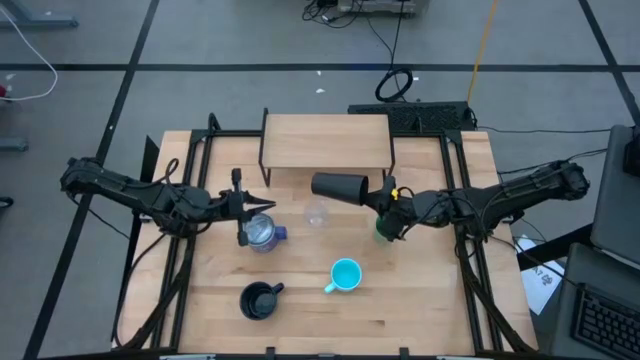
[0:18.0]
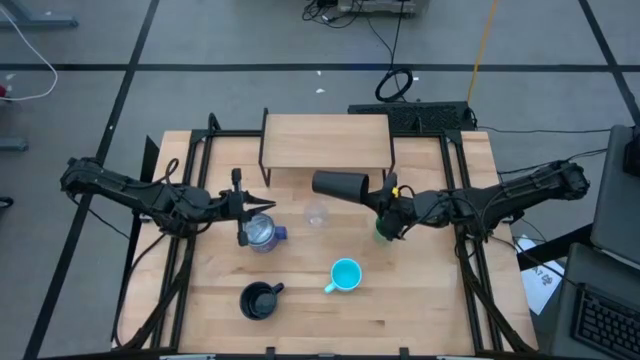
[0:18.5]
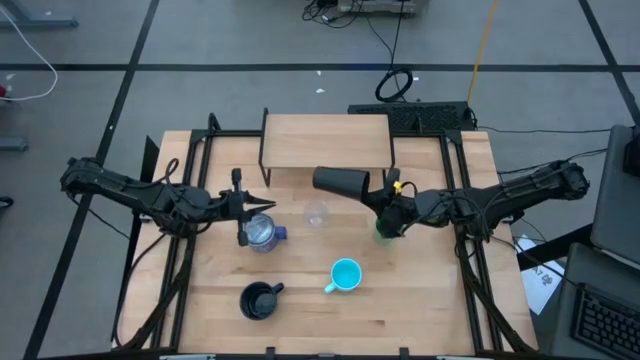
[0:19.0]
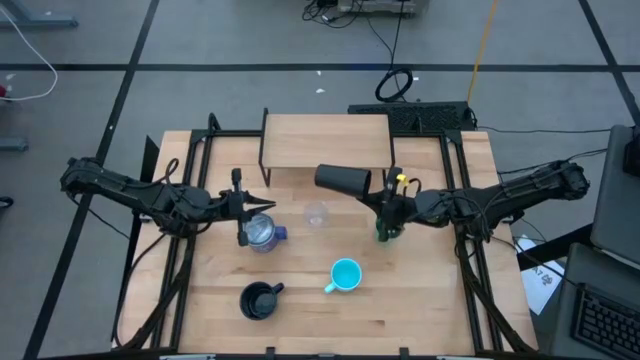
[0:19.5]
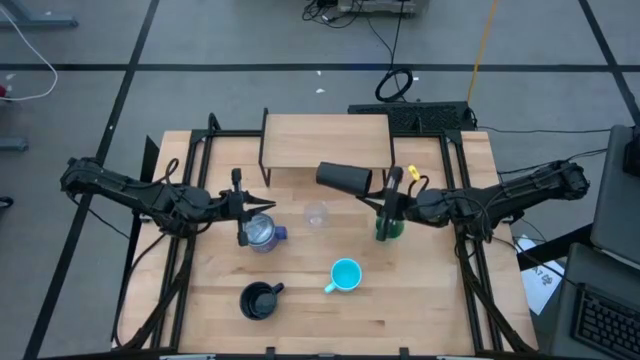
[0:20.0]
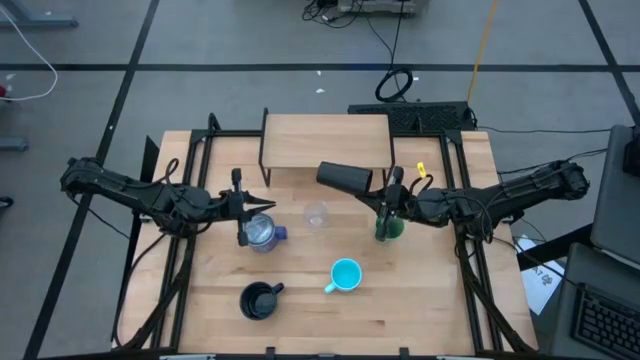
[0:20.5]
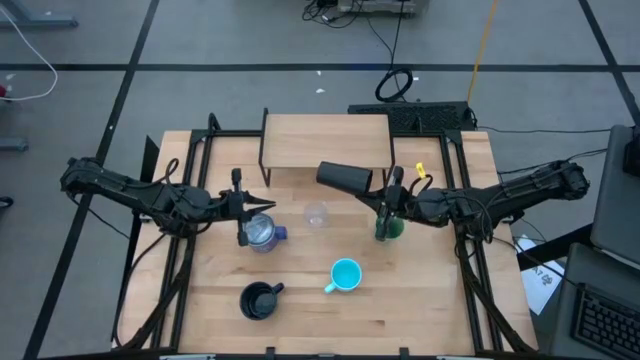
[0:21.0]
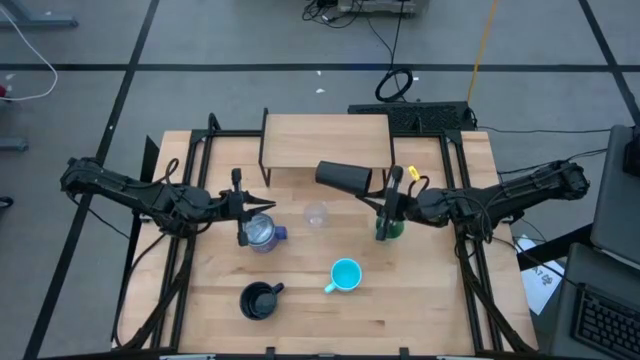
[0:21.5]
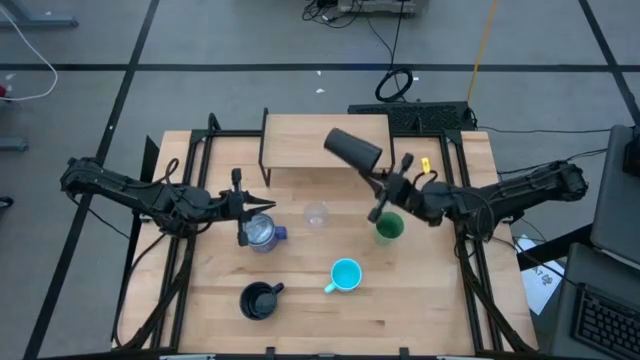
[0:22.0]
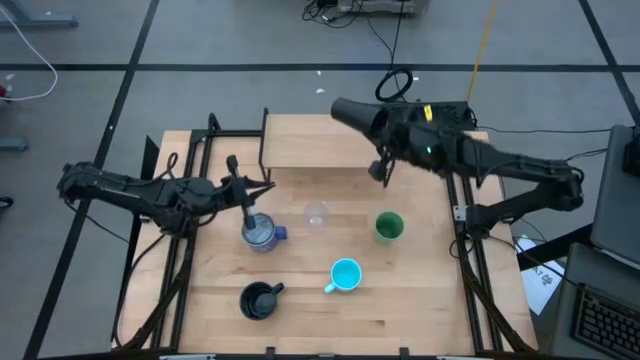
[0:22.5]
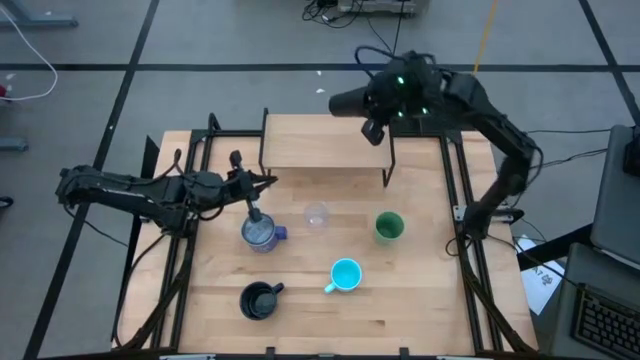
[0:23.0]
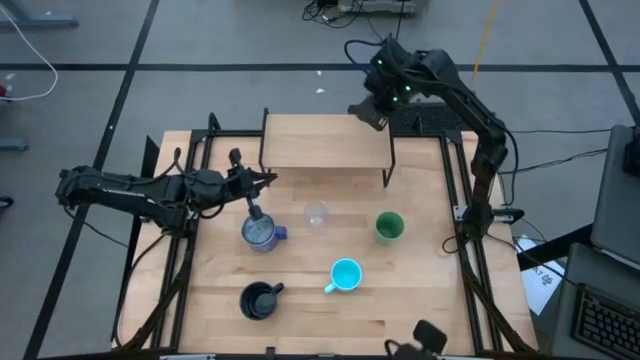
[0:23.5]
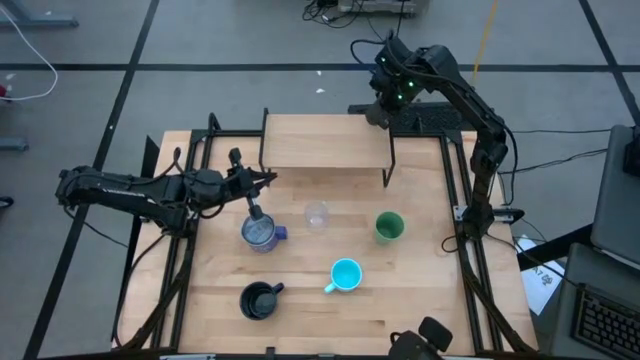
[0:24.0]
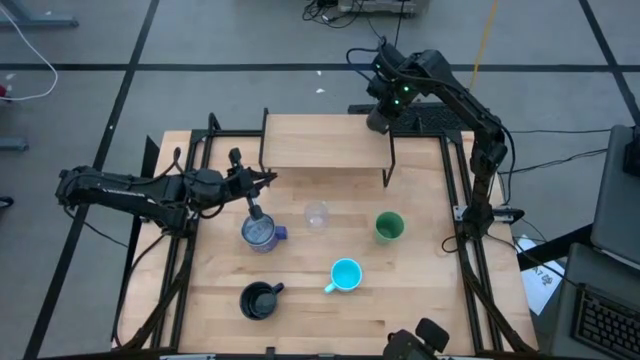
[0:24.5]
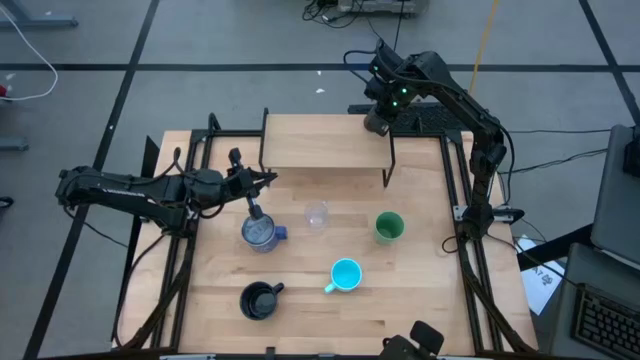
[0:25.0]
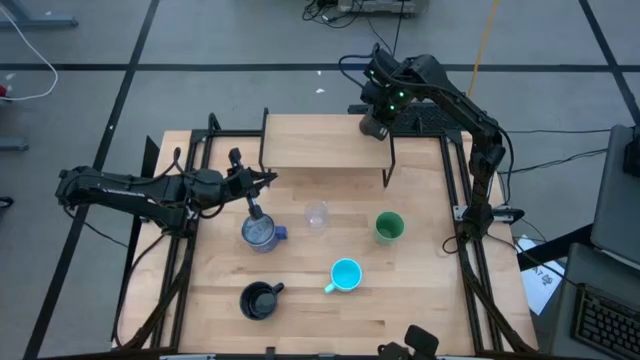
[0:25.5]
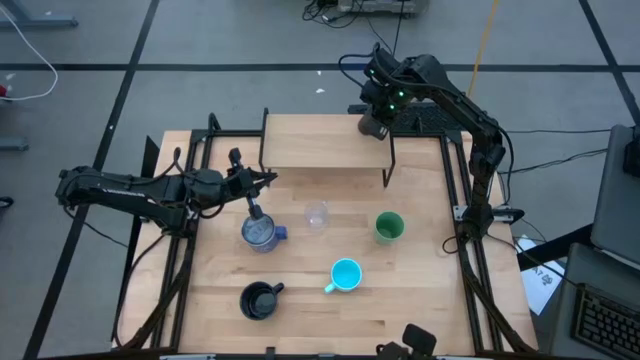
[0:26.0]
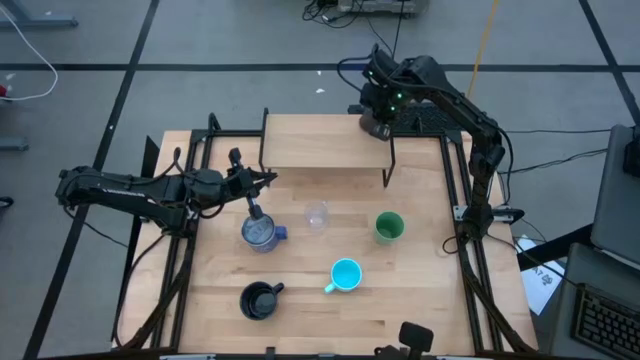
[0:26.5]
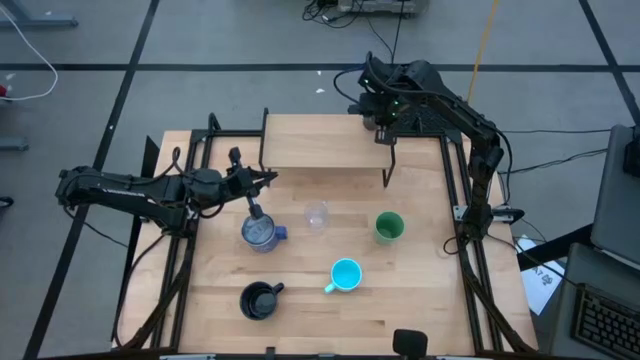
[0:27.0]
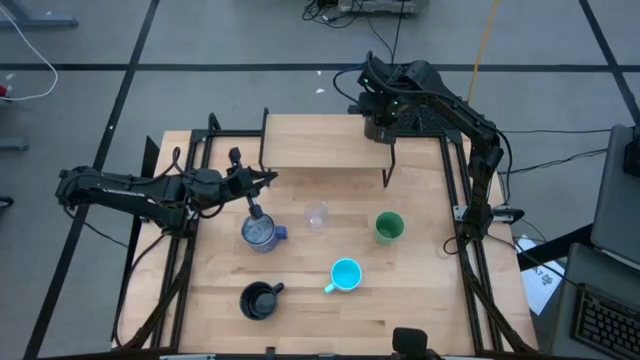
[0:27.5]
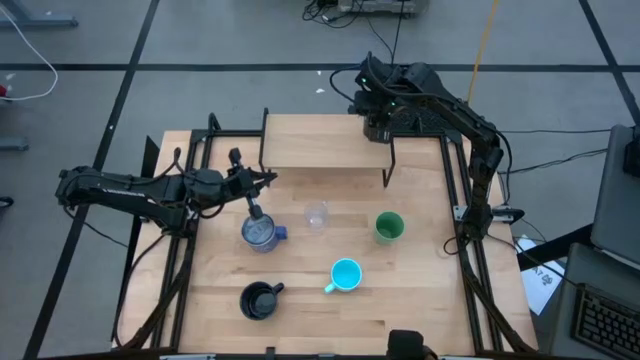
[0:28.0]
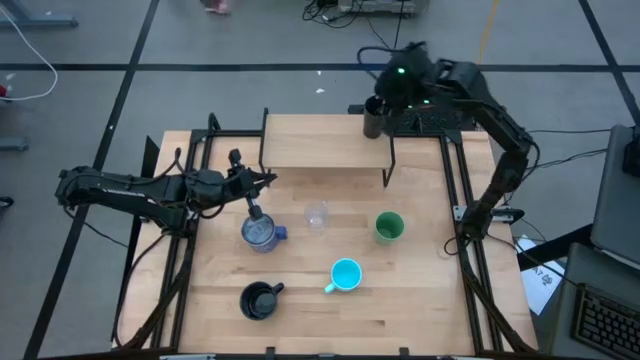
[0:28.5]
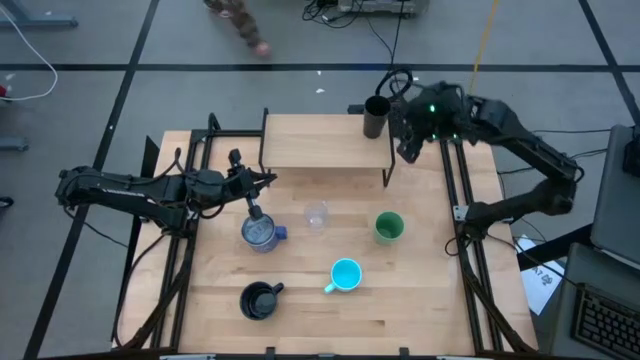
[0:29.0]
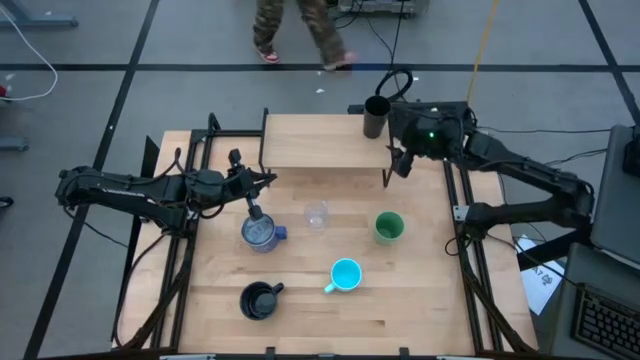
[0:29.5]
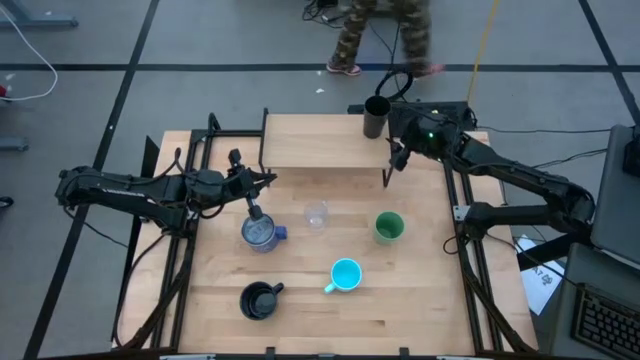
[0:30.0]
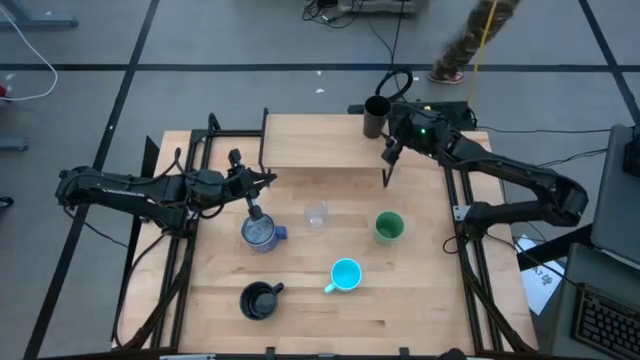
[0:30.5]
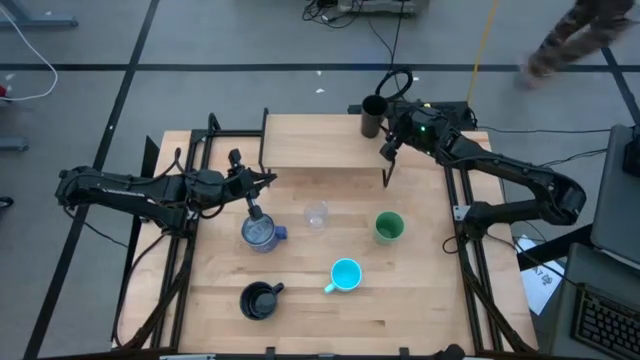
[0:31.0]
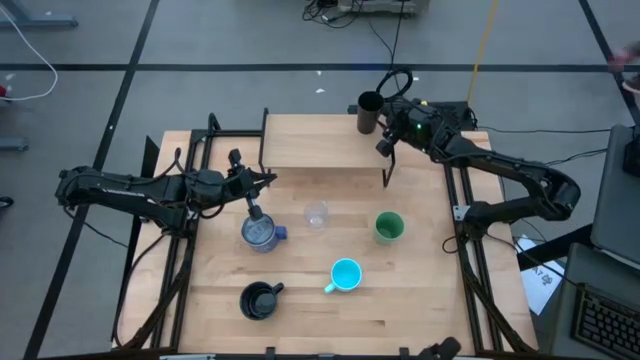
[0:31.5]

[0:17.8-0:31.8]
Task: Stack small to large cups/mugs on shelf
Put the black cup on the shelf

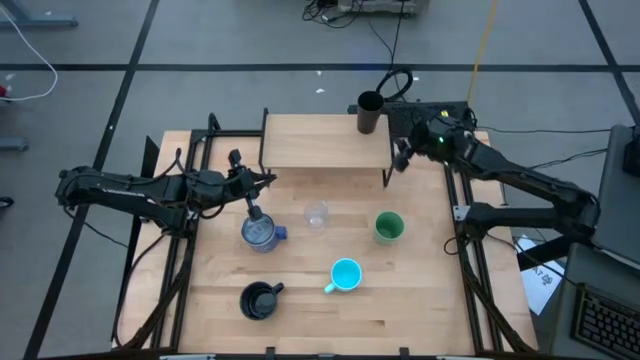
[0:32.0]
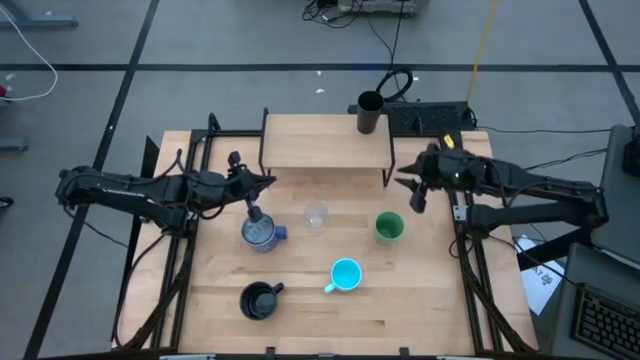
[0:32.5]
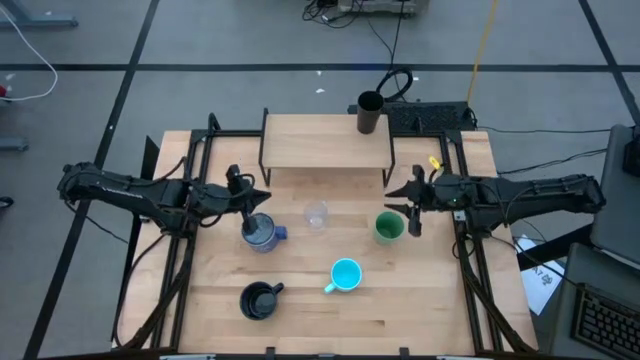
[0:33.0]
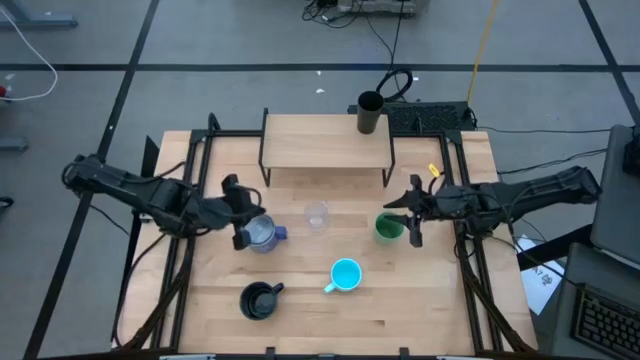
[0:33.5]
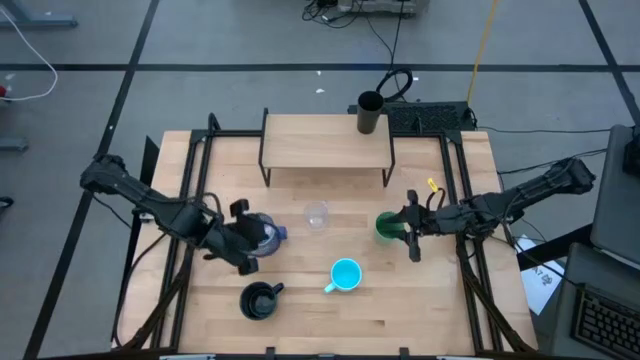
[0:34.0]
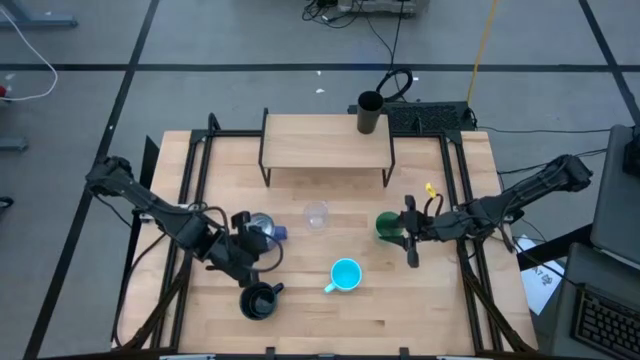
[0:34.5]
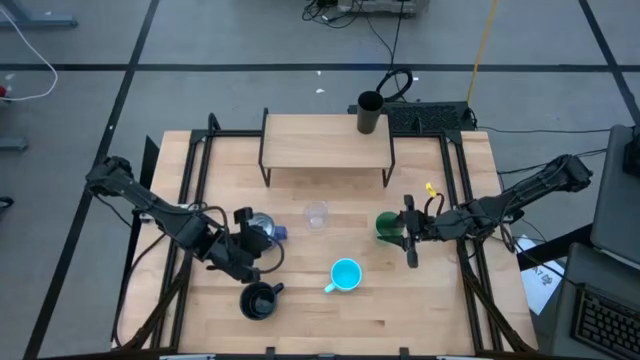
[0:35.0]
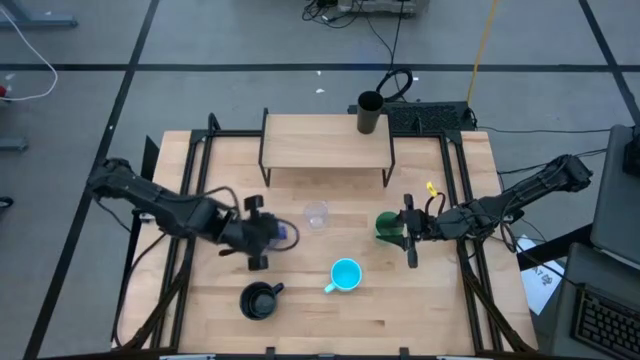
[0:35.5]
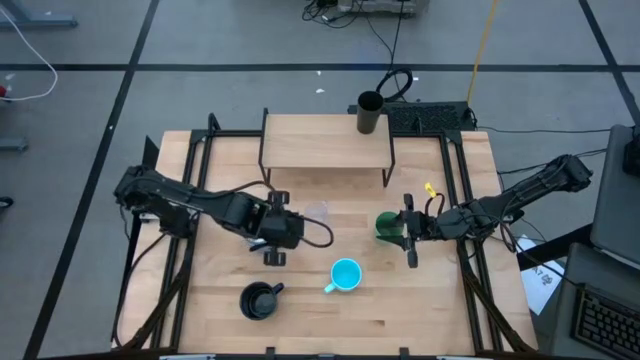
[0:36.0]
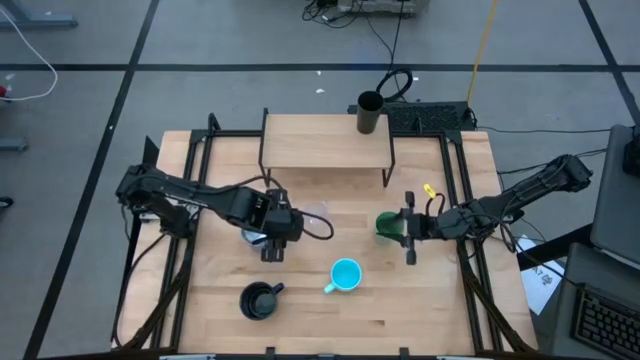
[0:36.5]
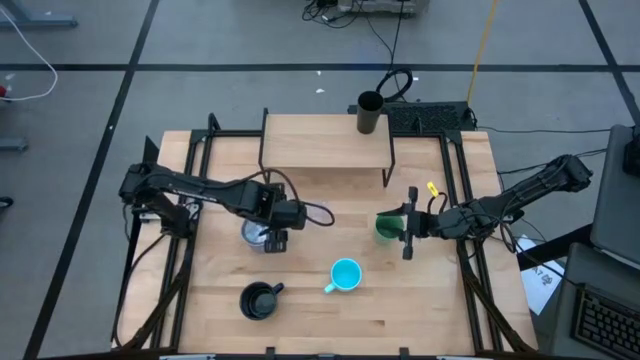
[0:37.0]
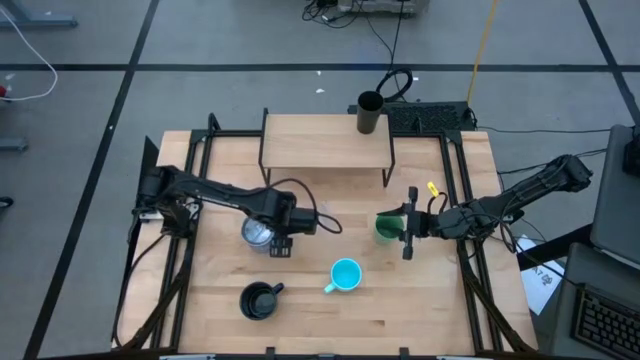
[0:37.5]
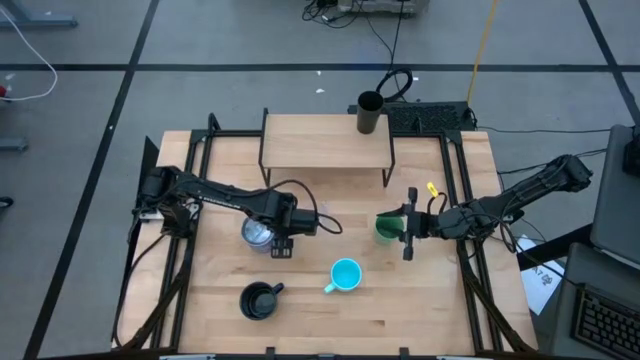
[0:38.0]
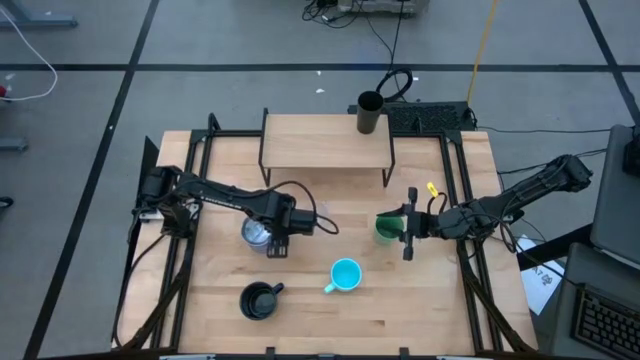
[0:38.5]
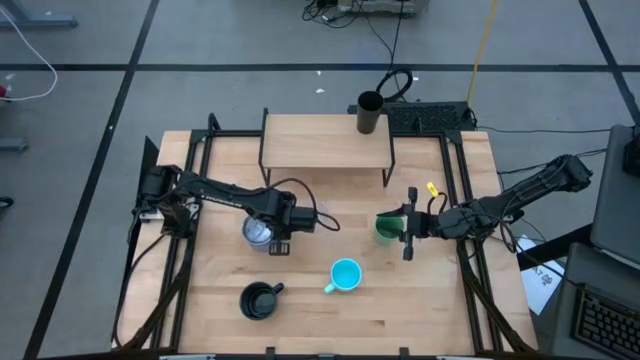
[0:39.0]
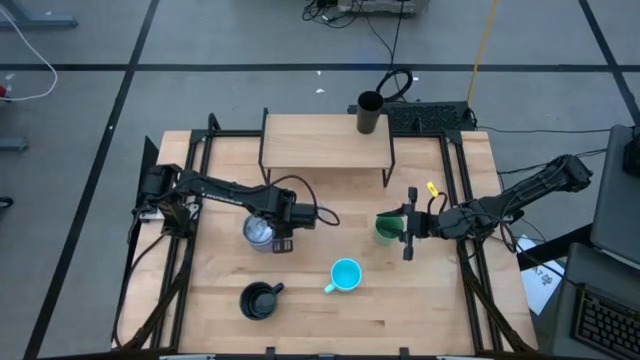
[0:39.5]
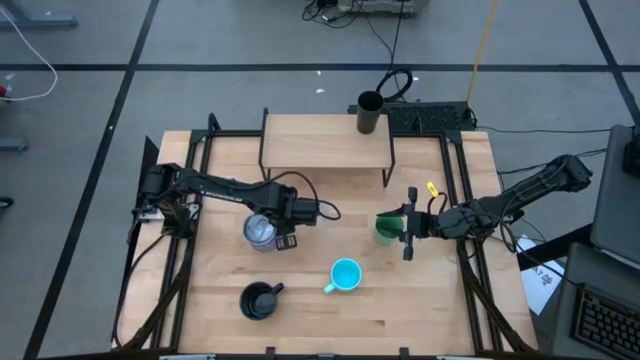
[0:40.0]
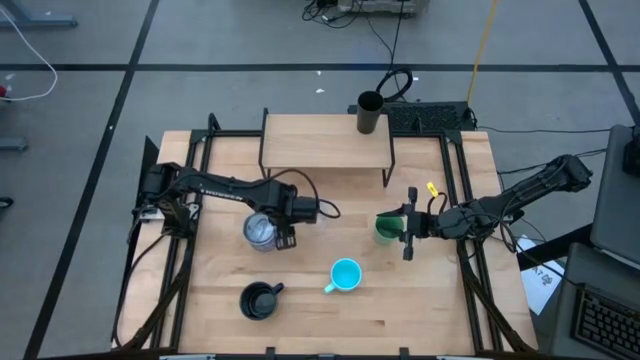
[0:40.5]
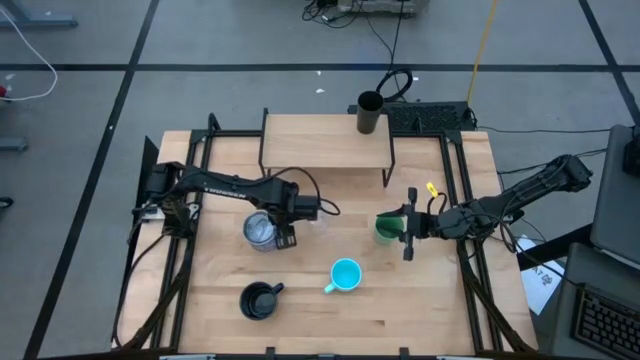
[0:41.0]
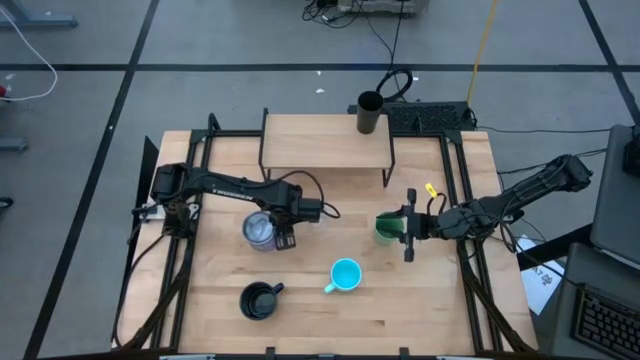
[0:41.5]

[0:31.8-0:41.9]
Put the blue mug on the shelf
